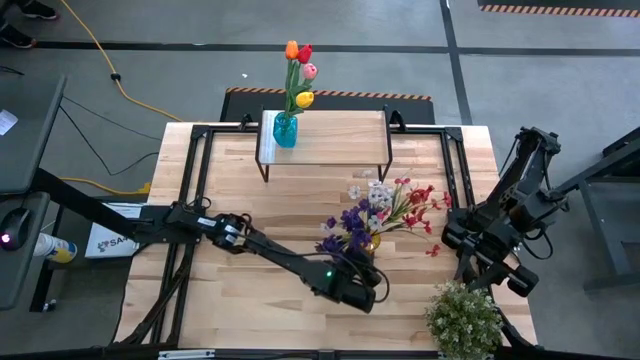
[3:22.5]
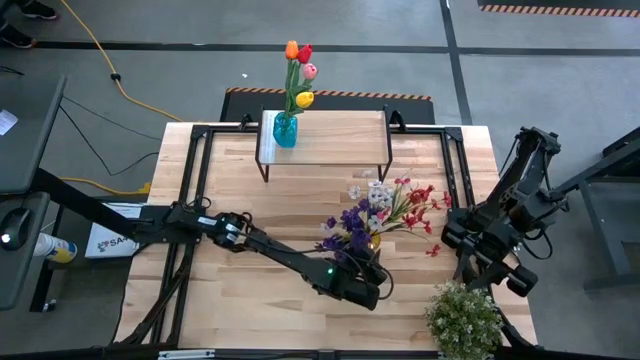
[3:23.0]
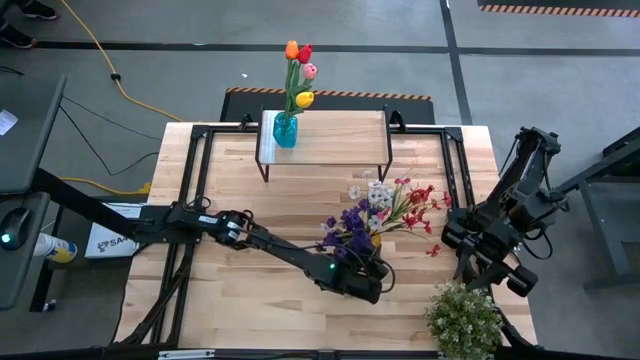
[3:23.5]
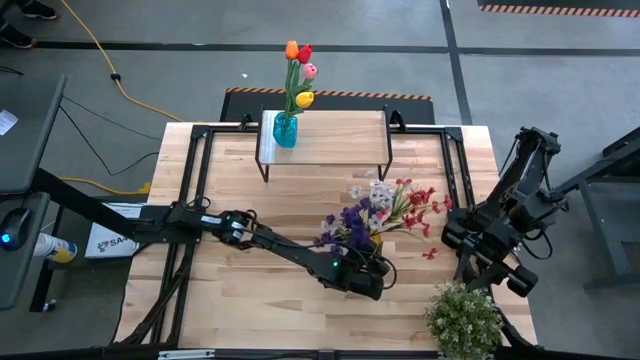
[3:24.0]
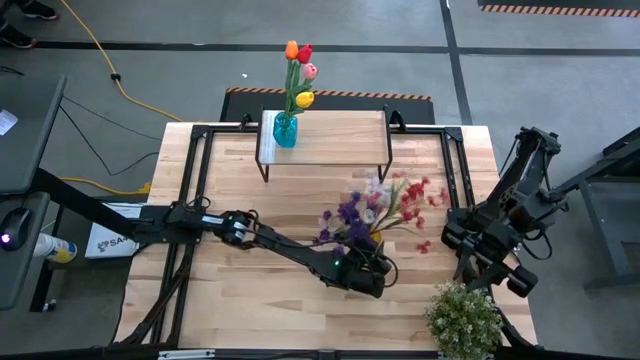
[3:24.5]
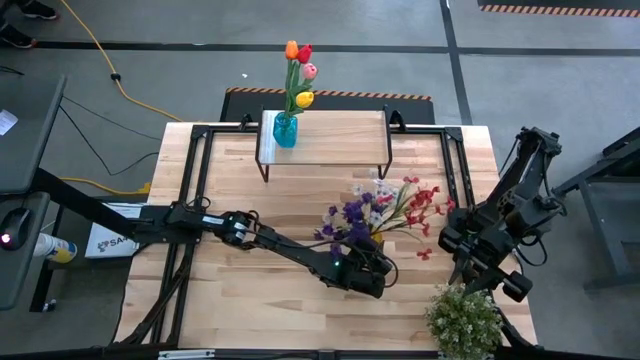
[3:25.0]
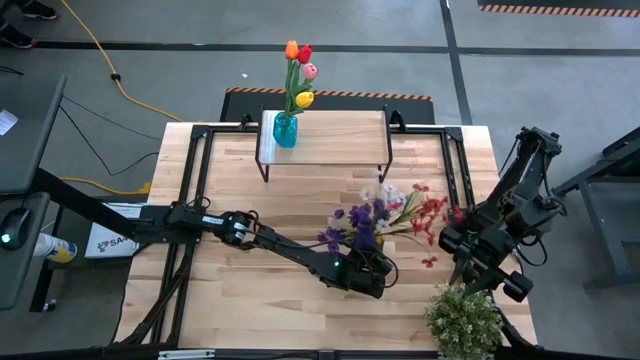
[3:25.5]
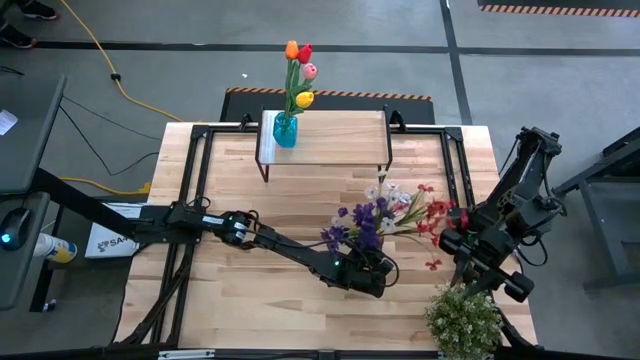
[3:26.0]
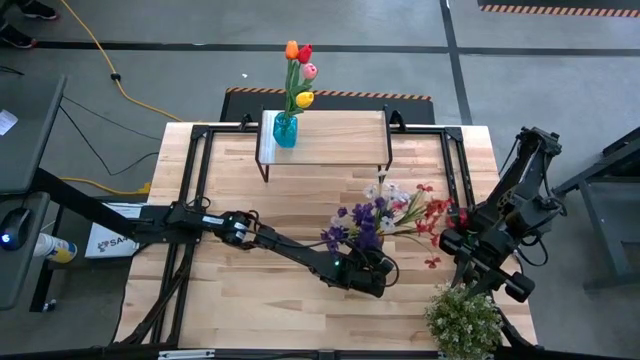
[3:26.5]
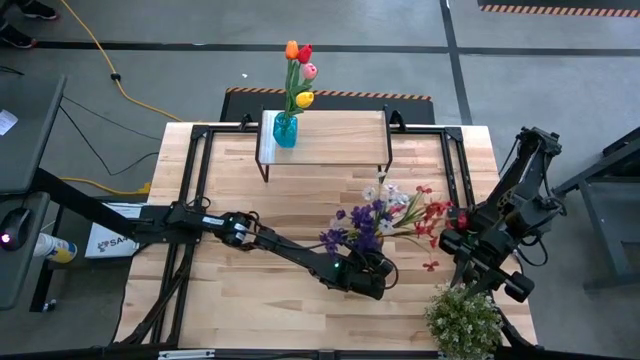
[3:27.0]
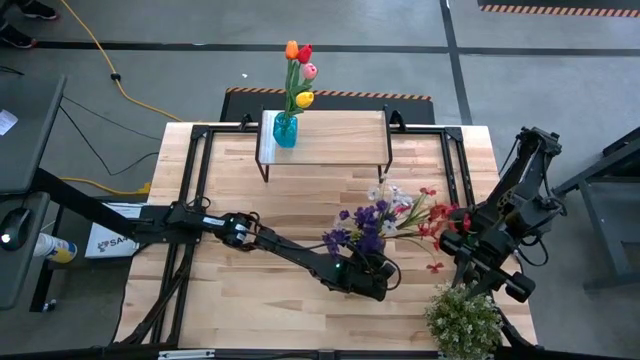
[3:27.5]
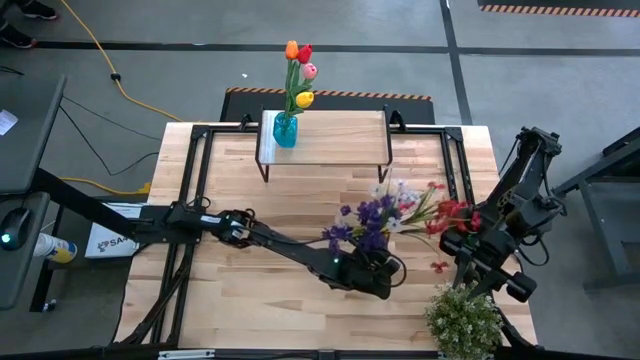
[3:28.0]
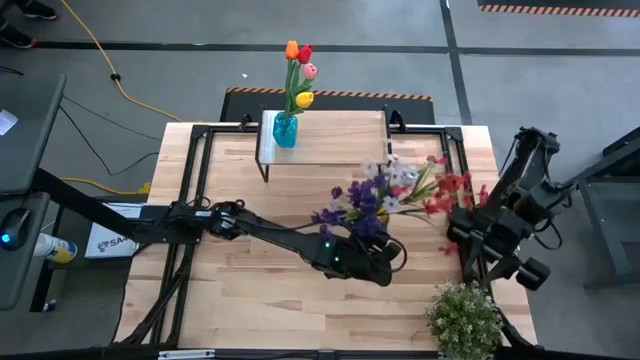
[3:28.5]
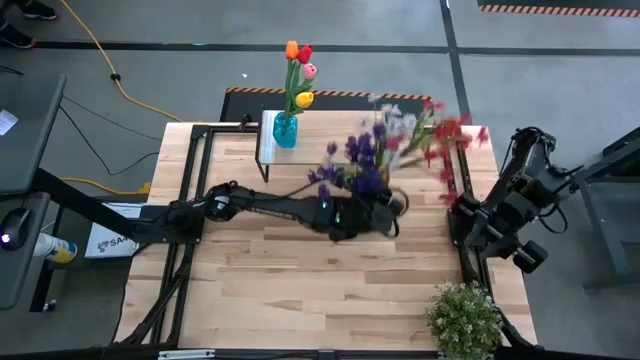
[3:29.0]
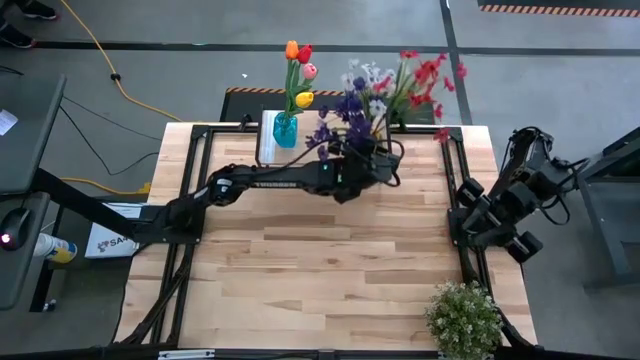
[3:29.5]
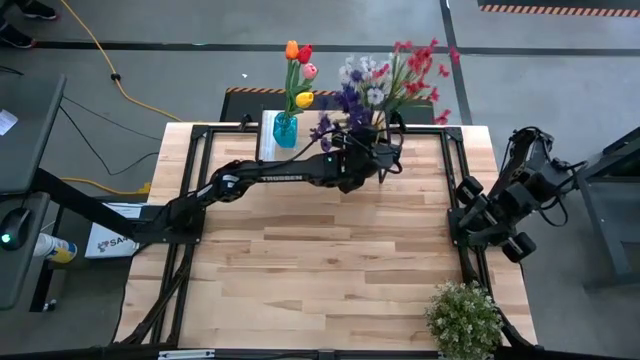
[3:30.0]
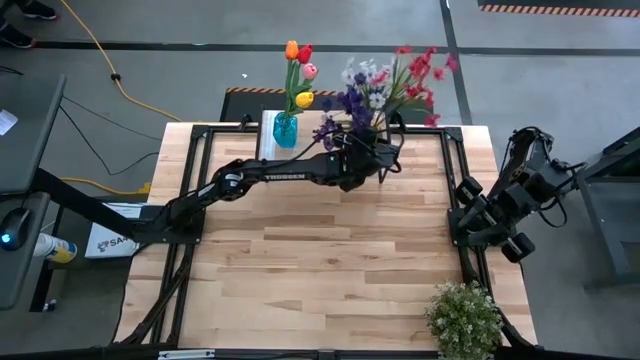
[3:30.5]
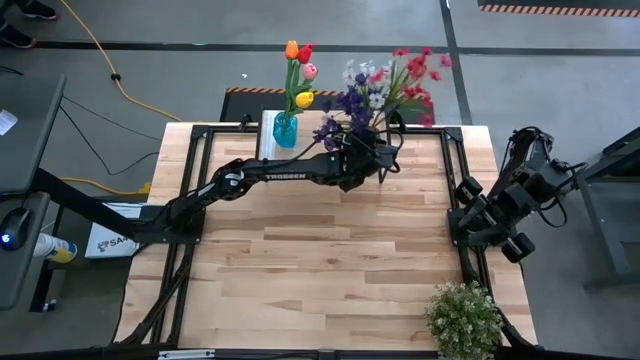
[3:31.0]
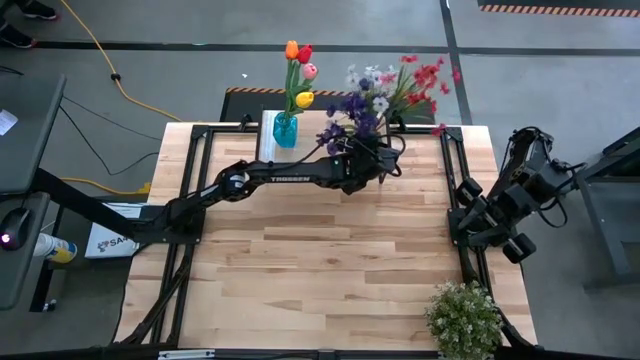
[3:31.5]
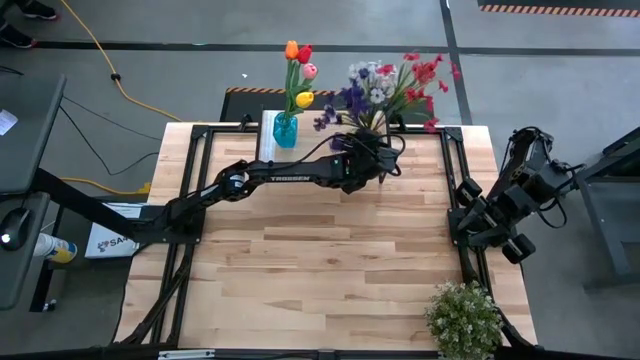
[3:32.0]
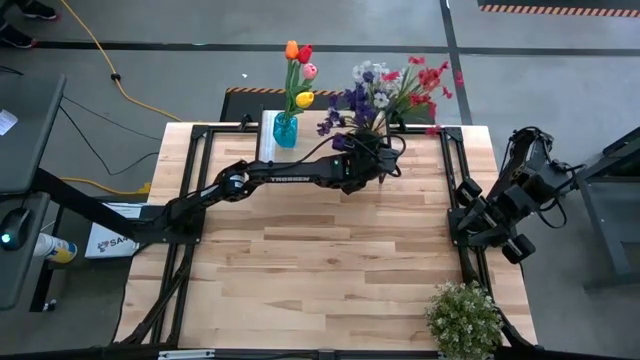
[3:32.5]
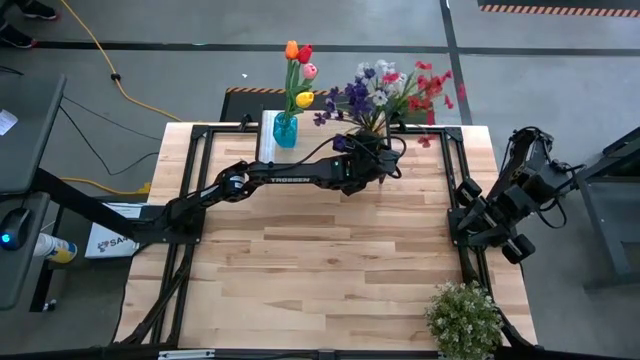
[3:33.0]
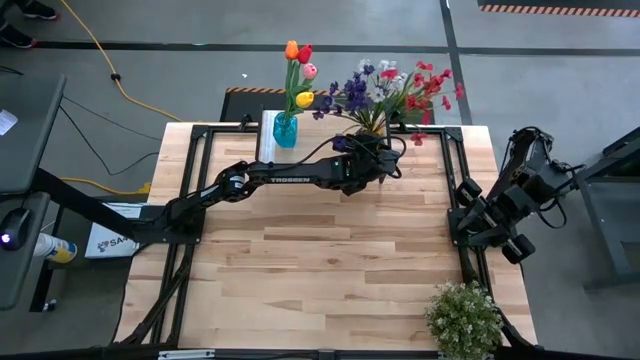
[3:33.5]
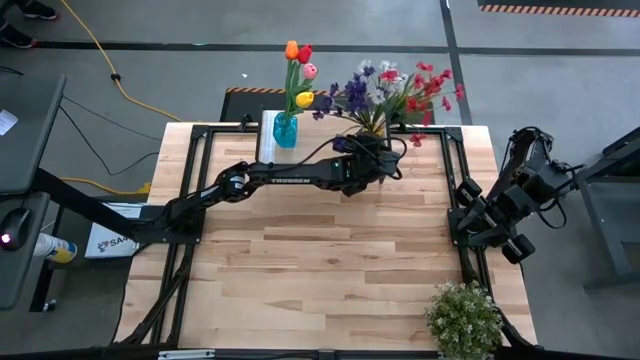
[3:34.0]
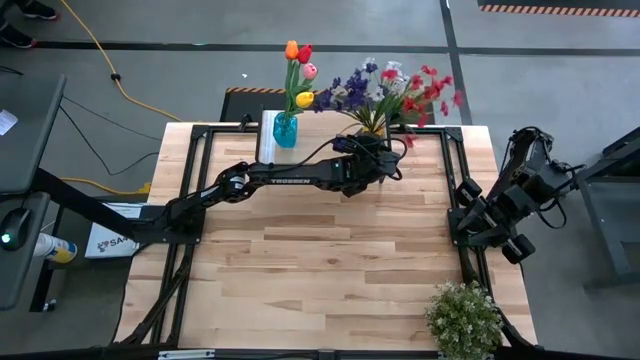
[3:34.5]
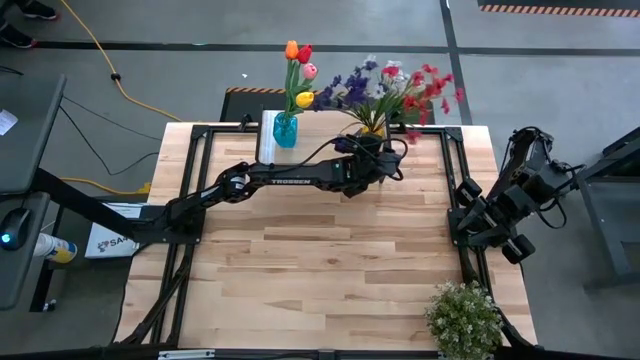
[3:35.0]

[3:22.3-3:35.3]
Task: Pick and place flowers into a vace then onto a shelf
Put the yellow flower vase on the shelf

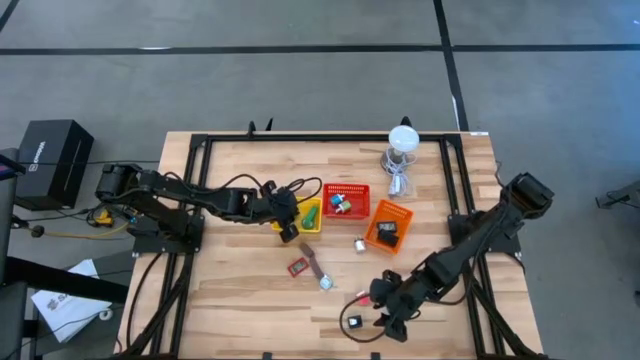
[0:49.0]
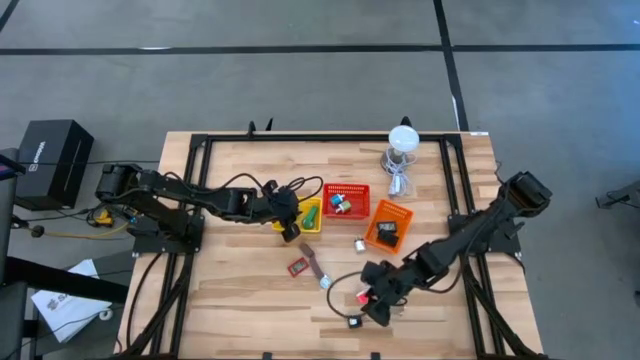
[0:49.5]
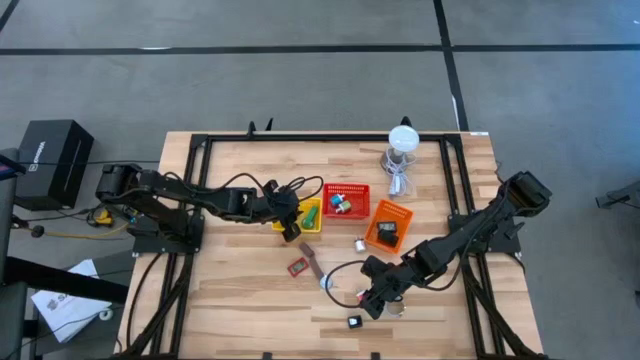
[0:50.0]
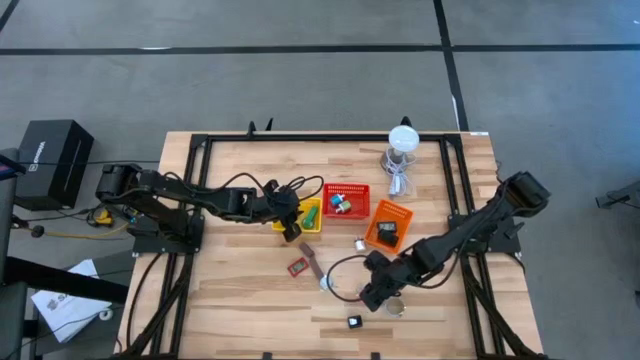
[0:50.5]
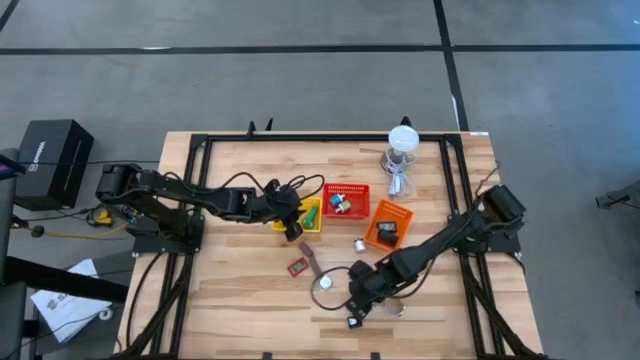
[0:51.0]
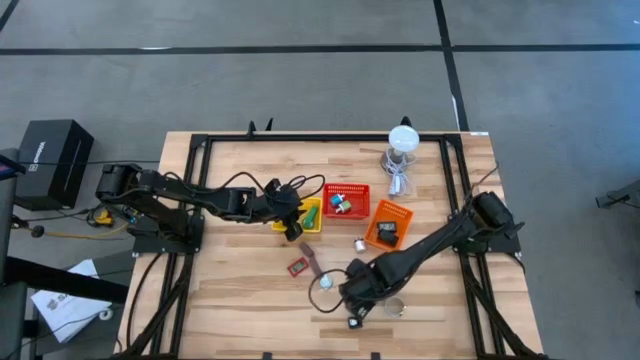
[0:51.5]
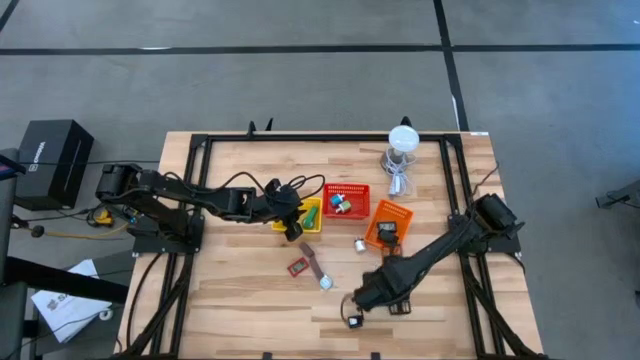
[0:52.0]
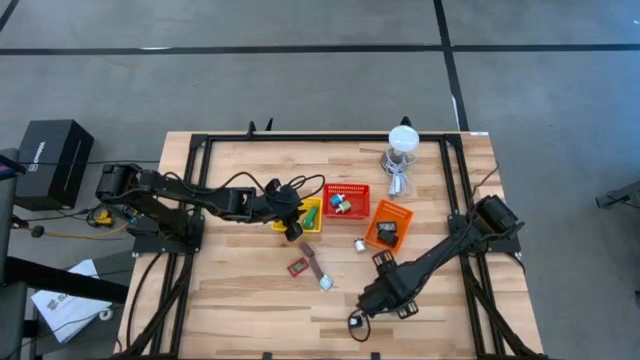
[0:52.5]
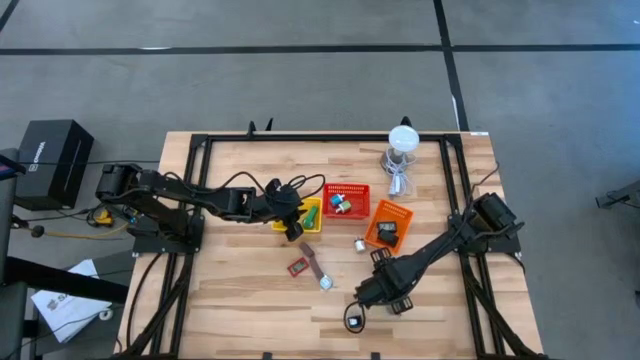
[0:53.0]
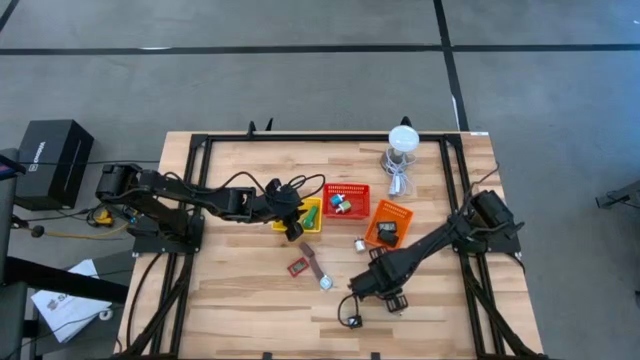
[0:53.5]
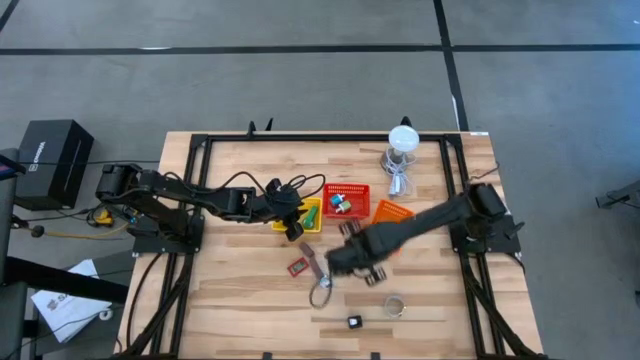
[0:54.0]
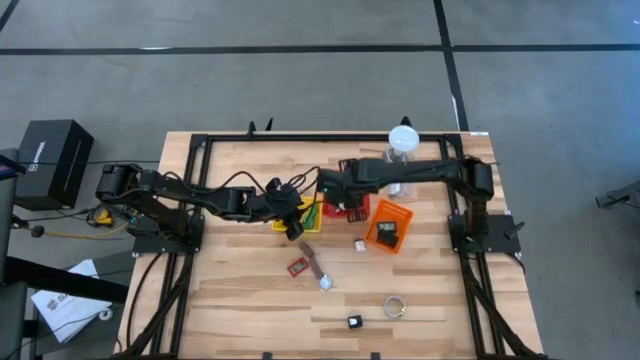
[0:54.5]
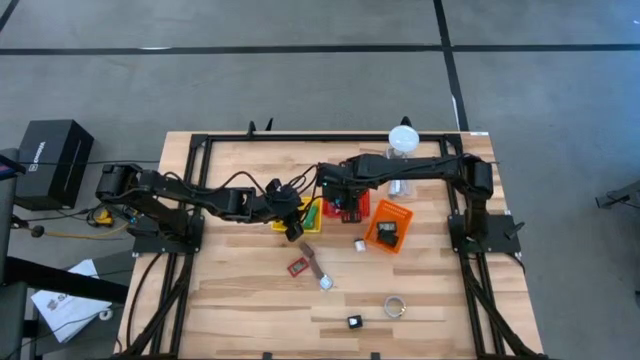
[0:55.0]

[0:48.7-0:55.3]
Task: Pick & Place Office items
Put the pink charger adapter into the red bin

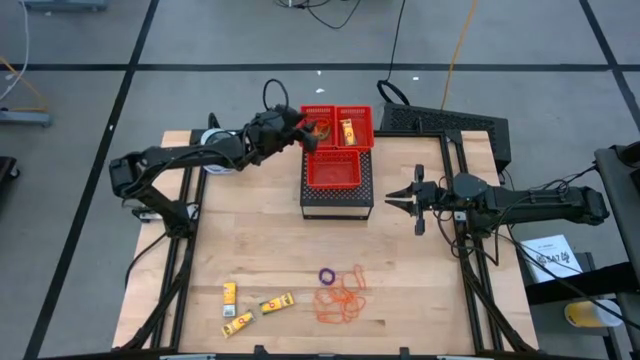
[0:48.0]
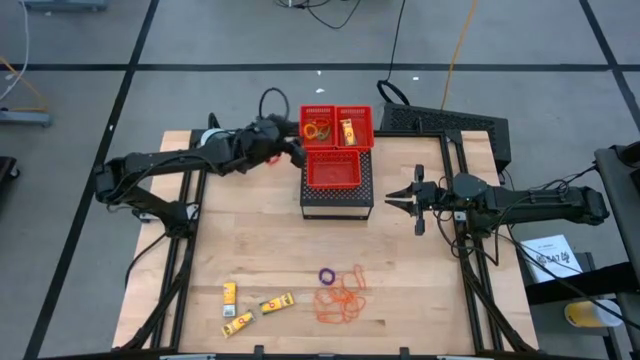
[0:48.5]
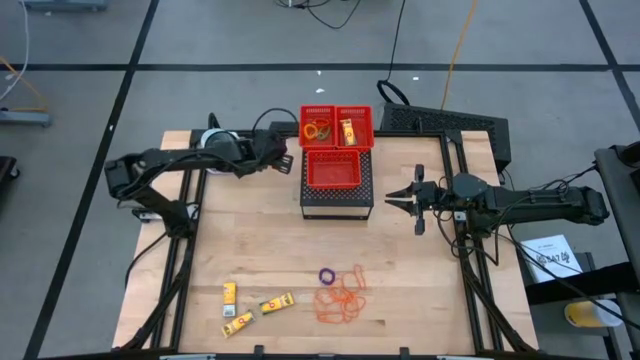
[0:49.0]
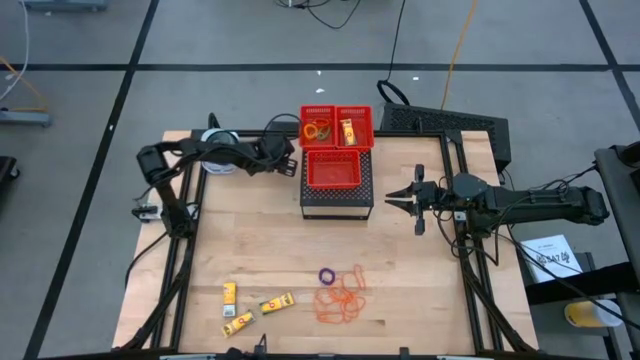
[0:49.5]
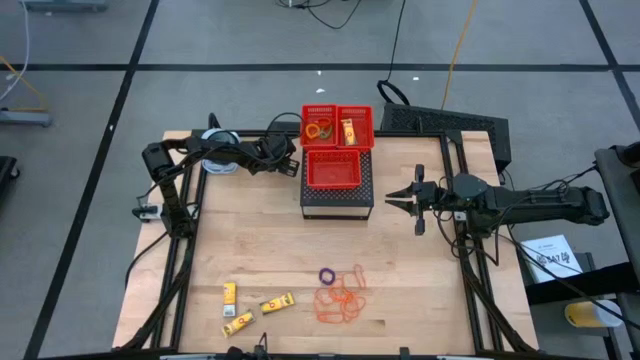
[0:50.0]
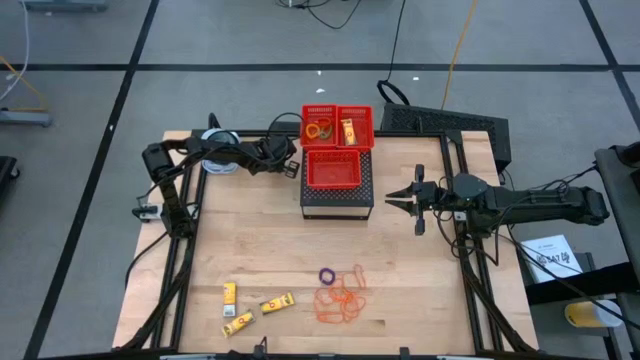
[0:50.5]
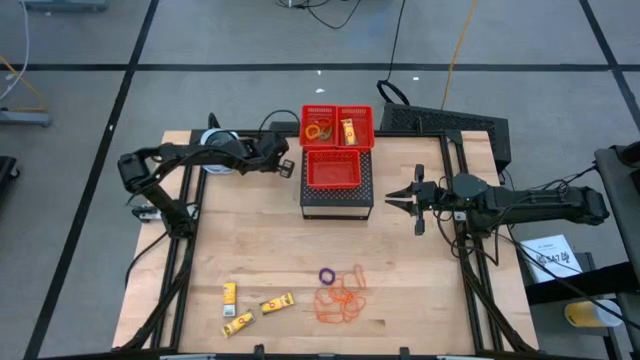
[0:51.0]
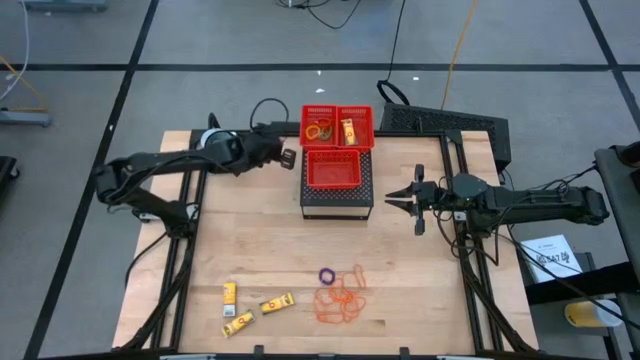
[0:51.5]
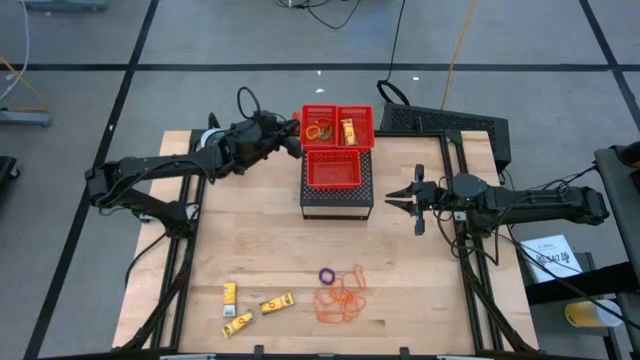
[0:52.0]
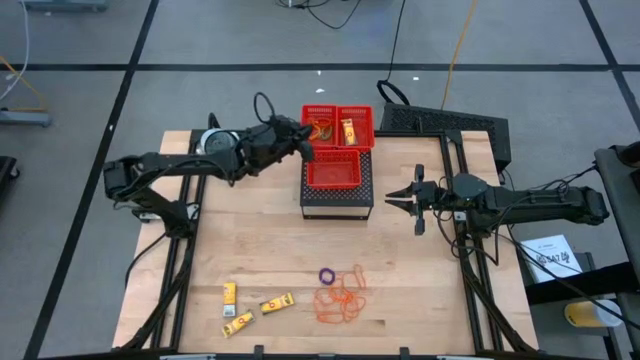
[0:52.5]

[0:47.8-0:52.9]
Task: Pick & Place Office Desk Supplies
Put the orange spring keychain in the top left red bin on the shelf
